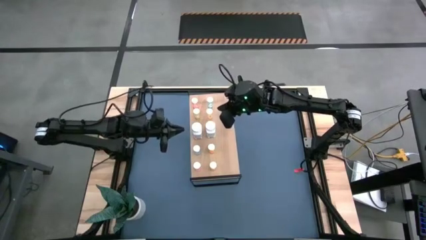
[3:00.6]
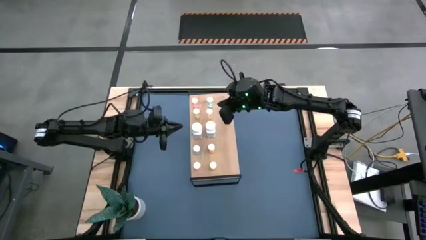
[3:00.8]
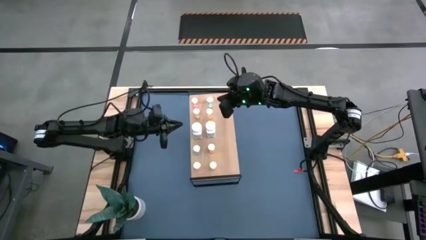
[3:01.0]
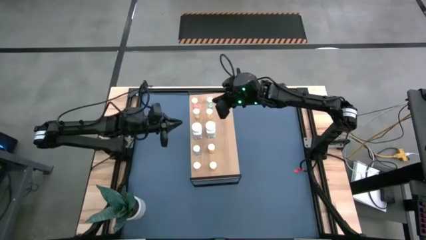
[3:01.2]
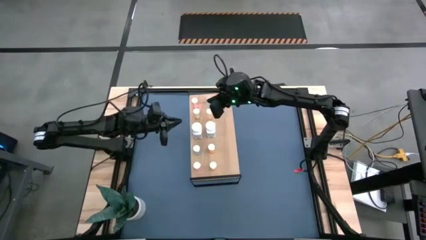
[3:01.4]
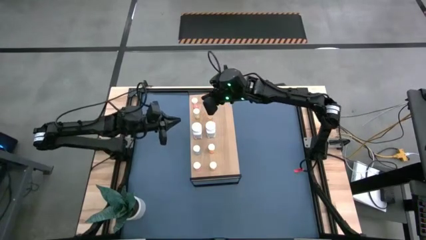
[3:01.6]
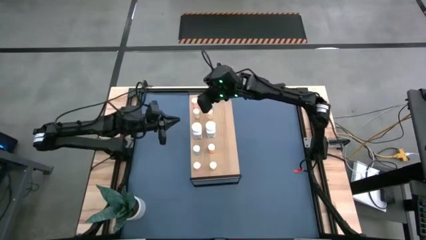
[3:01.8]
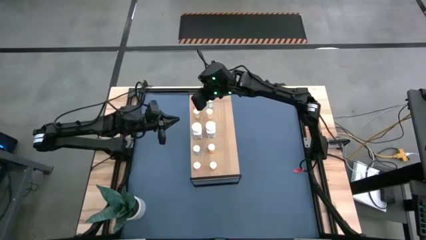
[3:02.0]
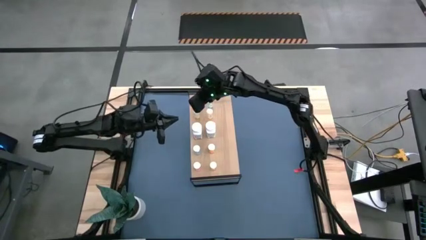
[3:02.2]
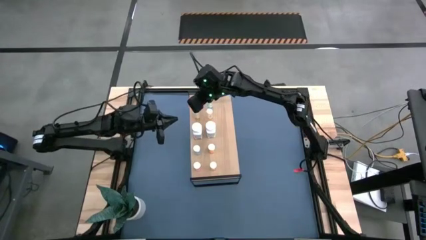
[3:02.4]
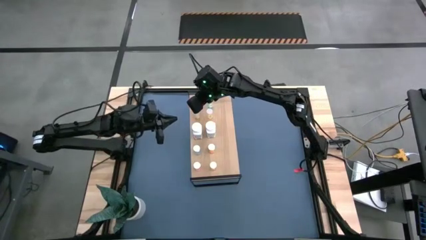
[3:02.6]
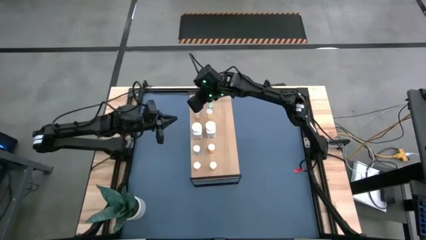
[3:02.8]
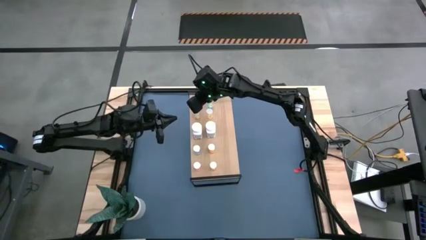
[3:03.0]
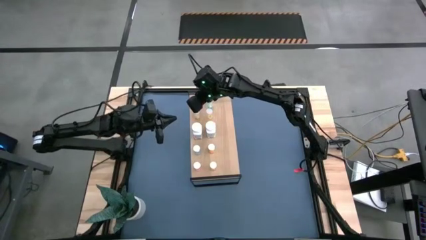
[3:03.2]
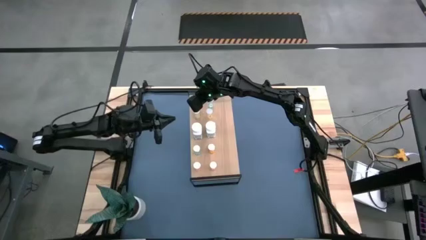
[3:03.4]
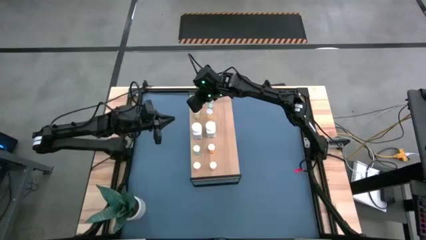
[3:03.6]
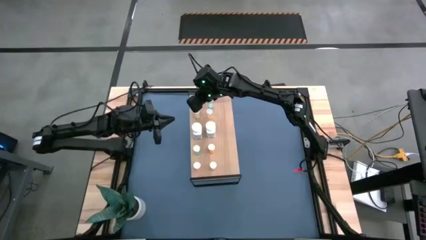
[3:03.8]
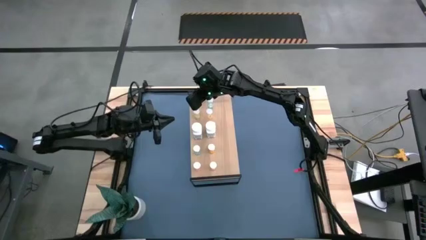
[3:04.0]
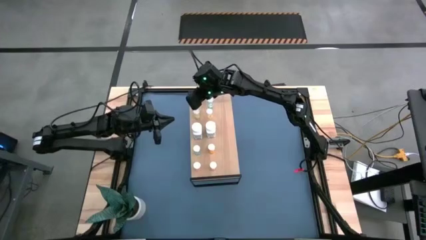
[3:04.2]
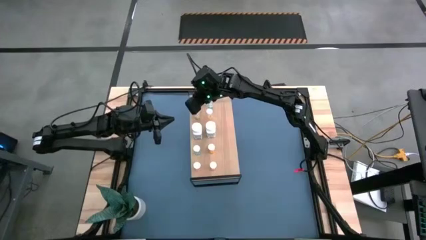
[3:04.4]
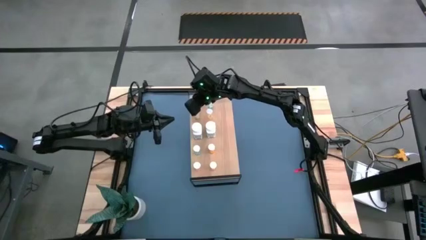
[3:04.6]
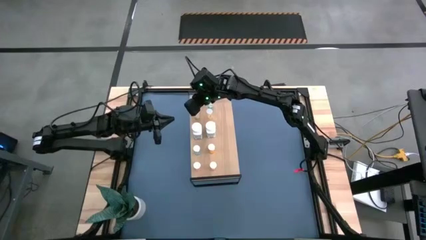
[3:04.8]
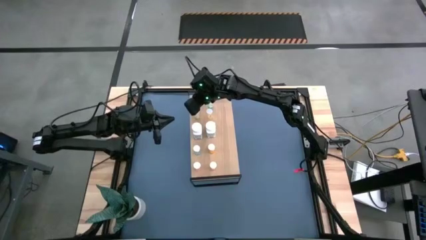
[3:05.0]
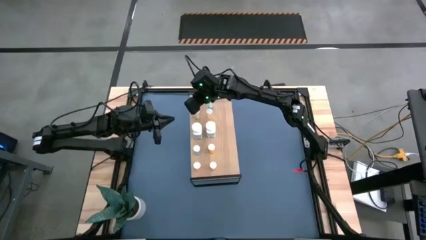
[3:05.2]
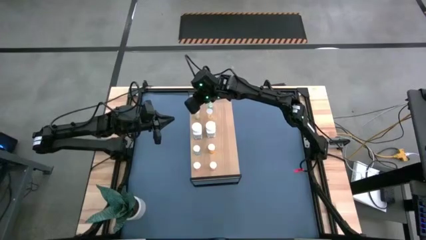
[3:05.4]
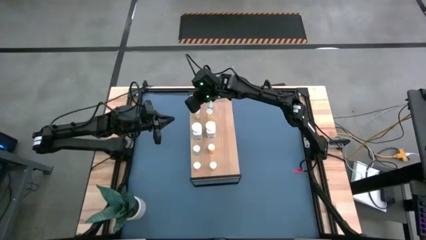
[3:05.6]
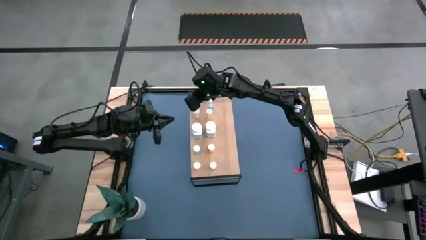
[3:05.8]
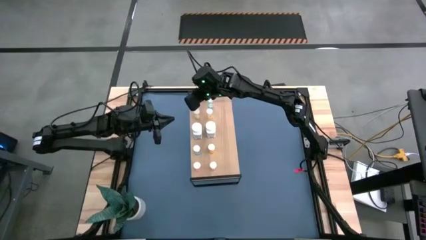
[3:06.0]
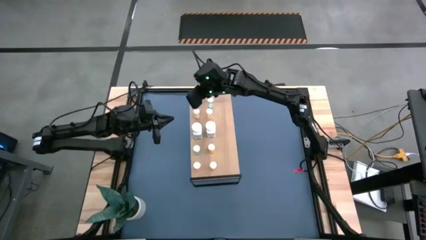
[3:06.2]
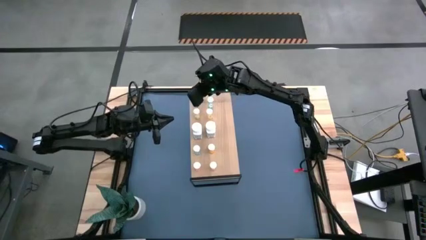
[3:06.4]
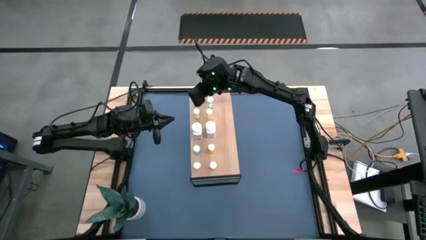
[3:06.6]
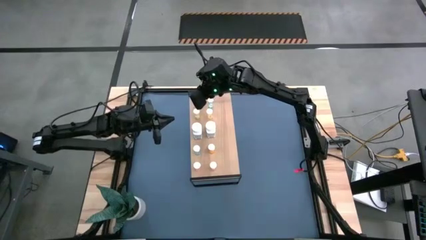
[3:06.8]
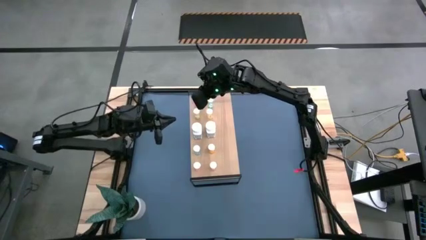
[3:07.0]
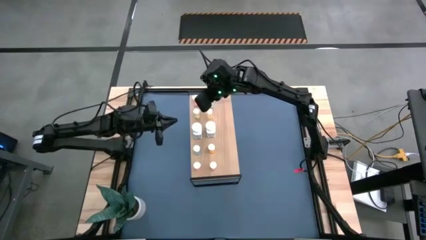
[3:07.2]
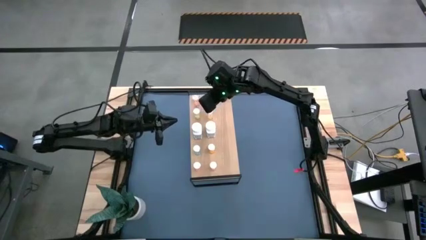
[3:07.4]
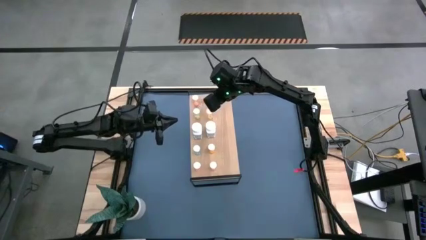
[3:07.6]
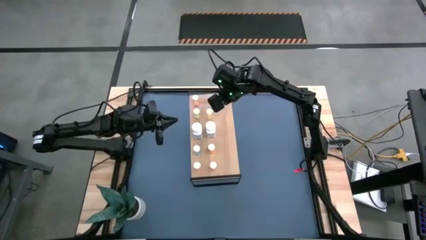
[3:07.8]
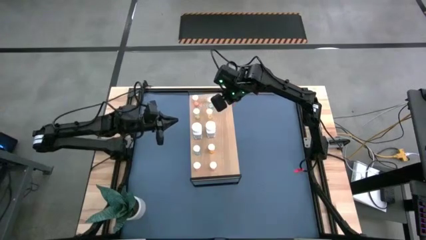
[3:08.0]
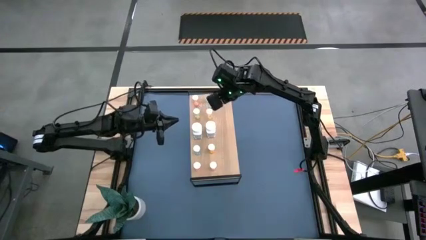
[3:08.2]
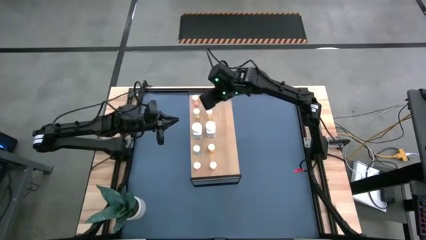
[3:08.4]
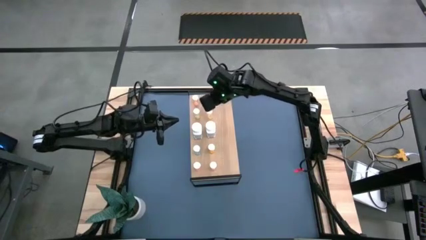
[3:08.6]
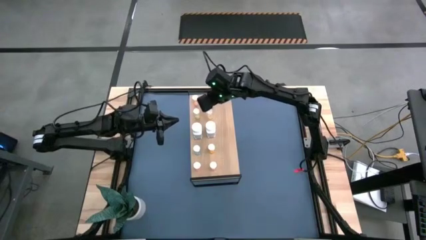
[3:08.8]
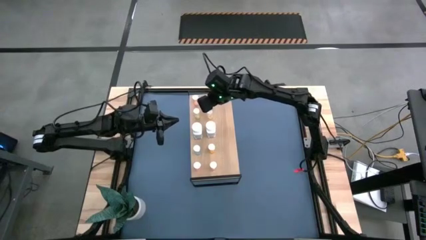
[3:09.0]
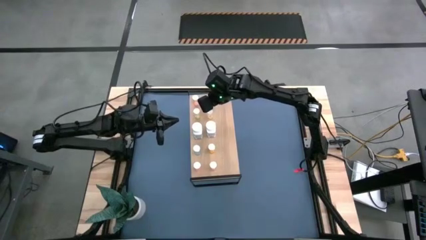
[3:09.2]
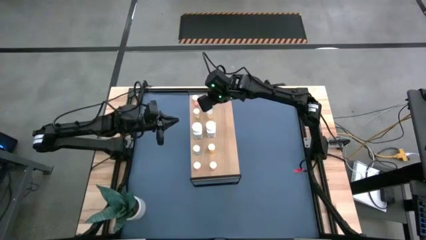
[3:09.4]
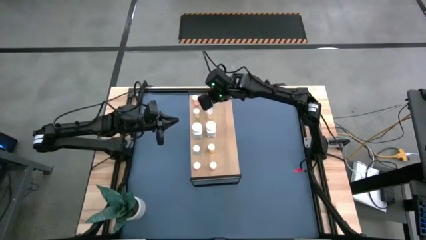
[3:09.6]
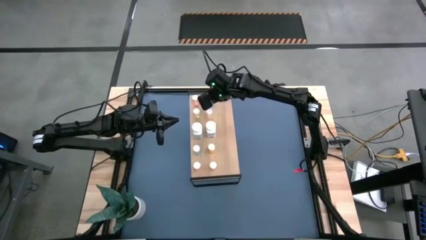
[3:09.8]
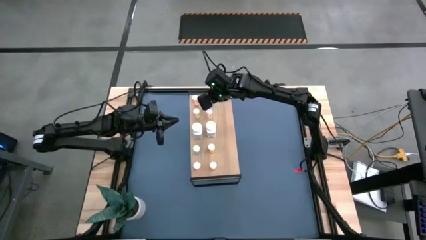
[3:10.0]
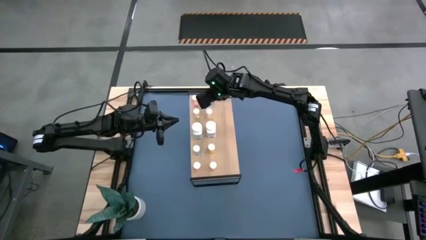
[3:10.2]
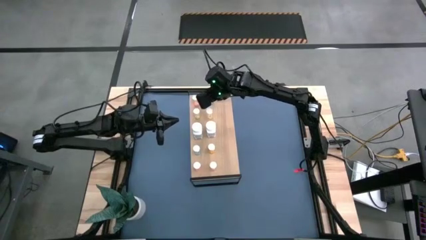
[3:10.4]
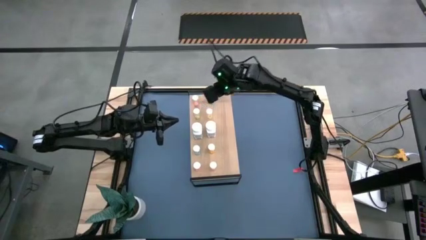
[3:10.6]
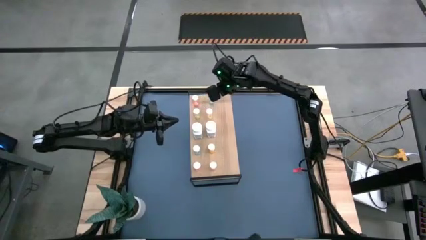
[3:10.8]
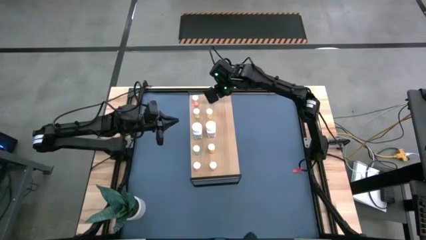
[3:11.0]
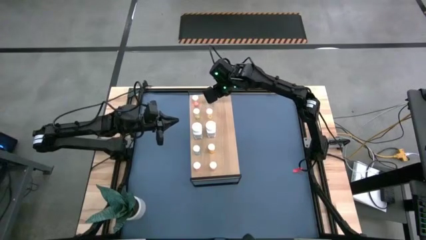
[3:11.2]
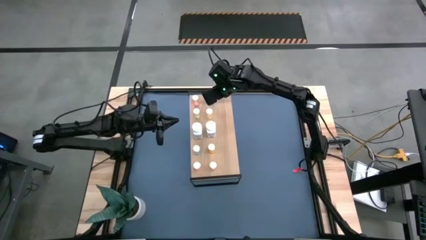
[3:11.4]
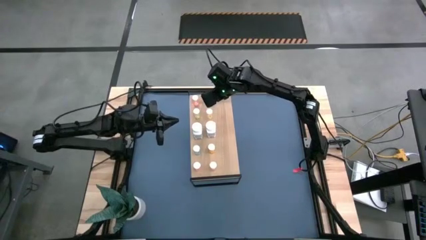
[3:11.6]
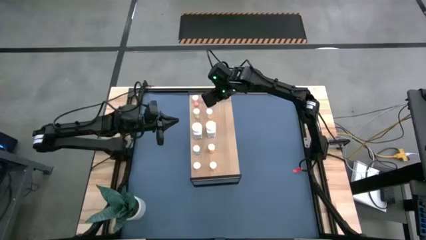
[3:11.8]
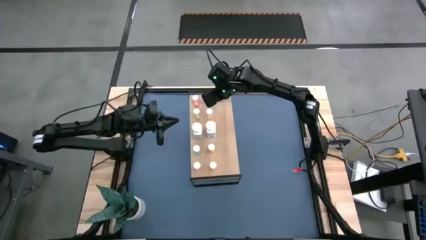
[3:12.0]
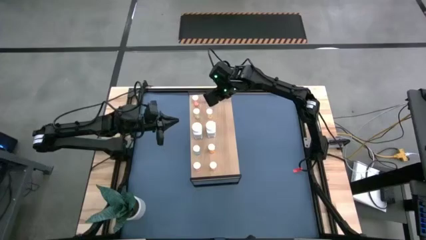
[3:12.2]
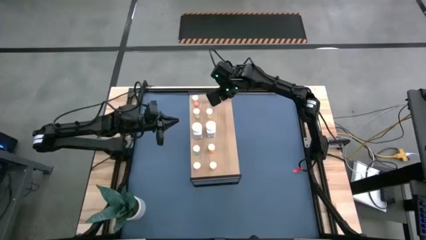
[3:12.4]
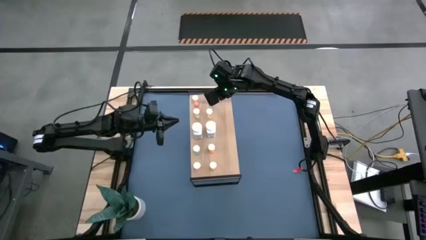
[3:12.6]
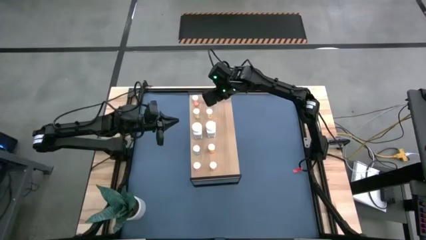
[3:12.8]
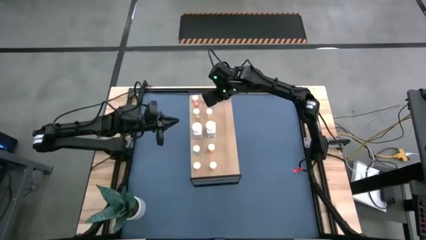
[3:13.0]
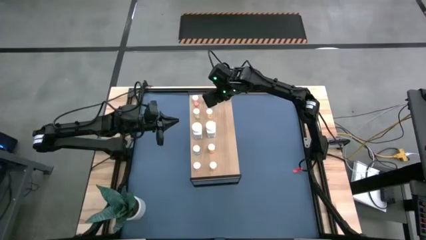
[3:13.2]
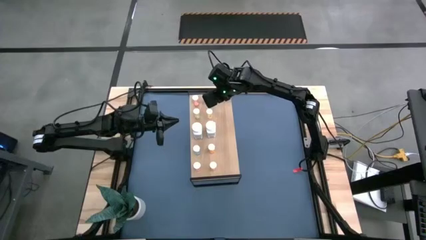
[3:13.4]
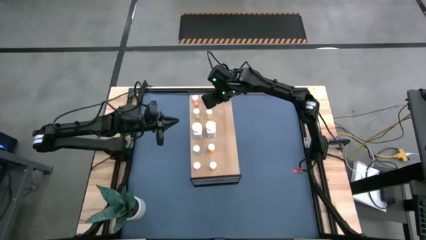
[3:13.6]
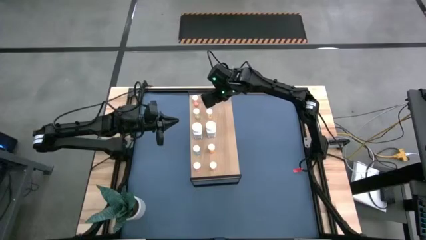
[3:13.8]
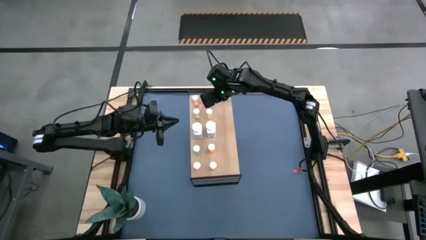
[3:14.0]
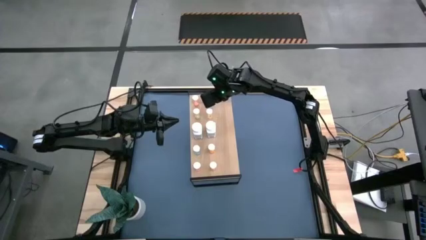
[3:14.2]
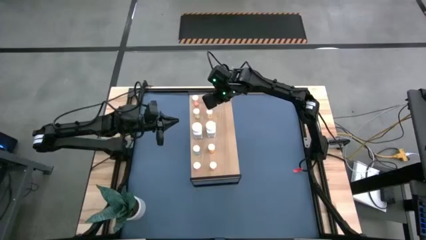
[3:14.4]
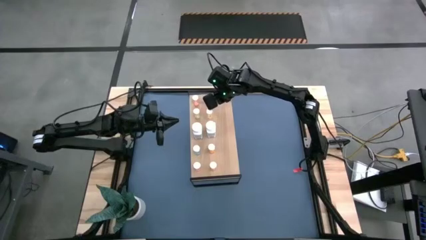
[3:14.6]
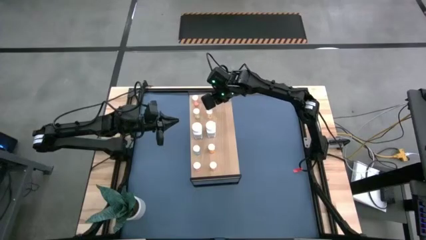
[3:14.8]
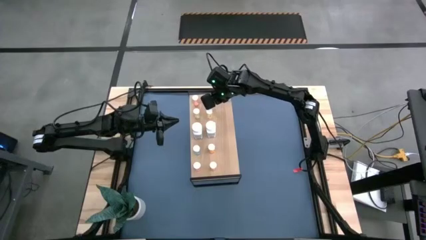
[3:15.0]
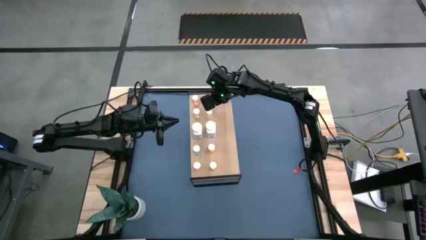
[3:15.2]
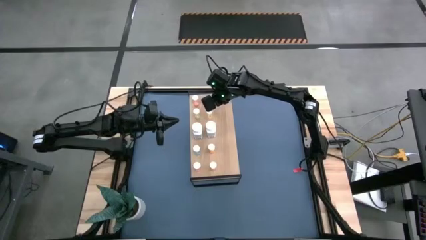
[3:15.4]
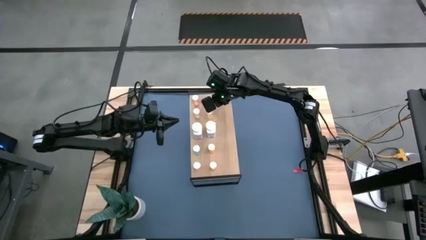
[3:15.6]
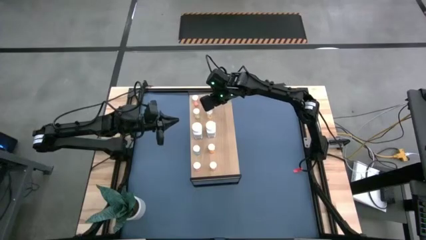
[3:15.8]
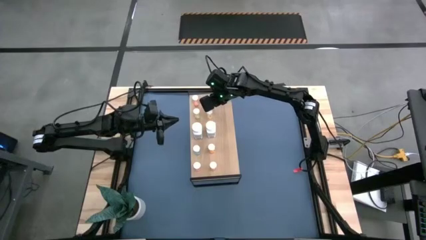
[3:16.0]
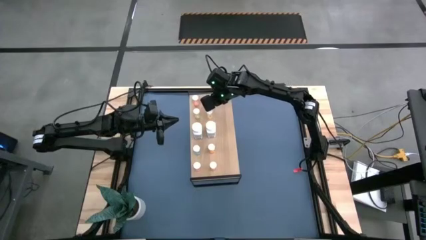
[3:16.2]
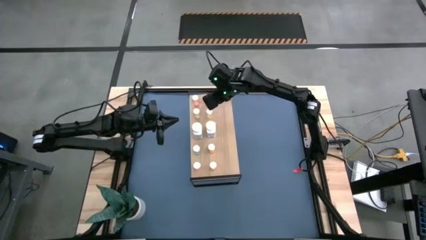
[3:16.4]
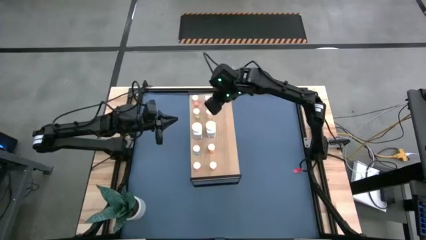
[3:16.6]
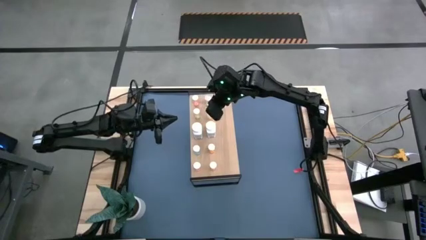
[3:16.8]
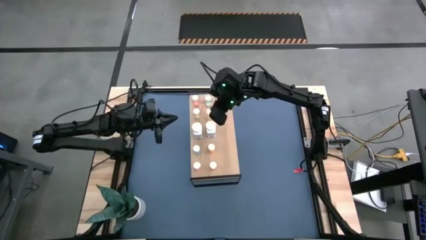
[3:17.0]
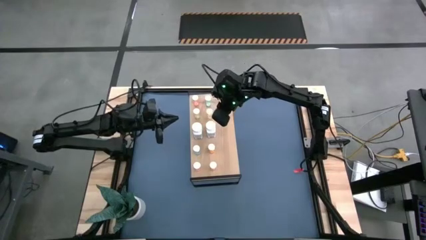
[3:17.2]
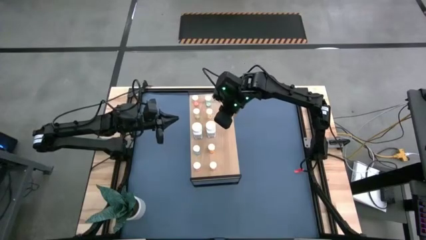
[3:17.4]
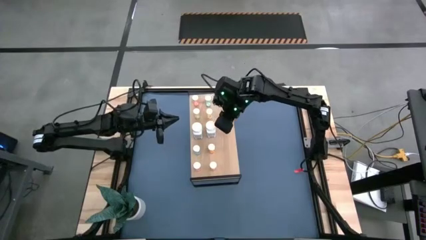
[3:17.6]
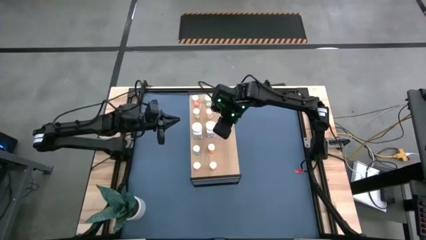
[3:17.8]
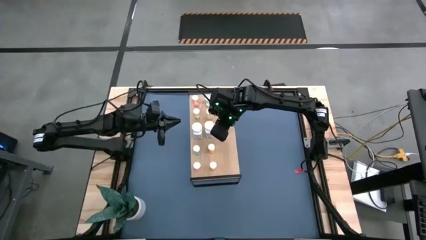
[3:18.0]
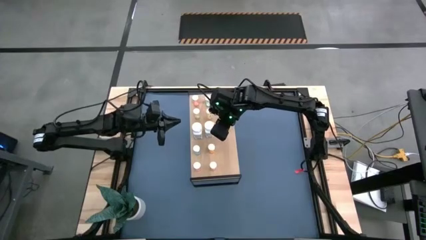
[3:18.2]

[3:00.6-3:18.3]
Task: Pick and place medicine bottles onto shelf by color
Adjust the pill bottles on the shelf
